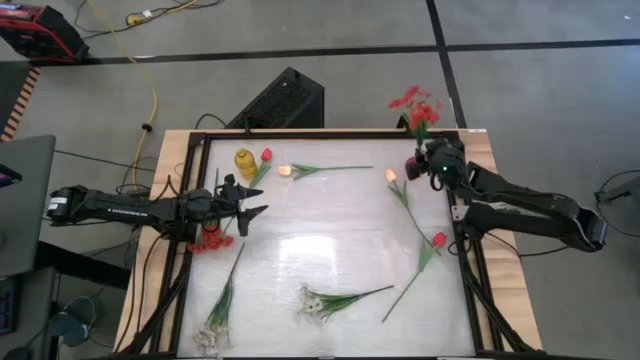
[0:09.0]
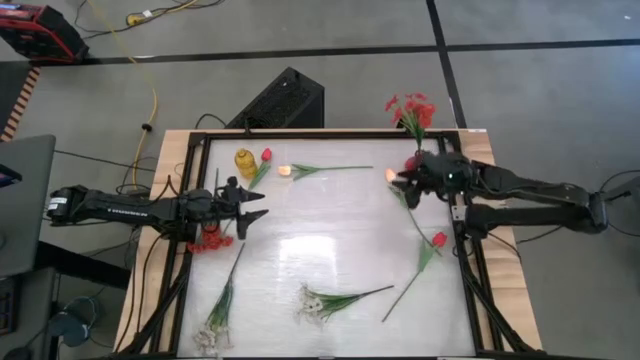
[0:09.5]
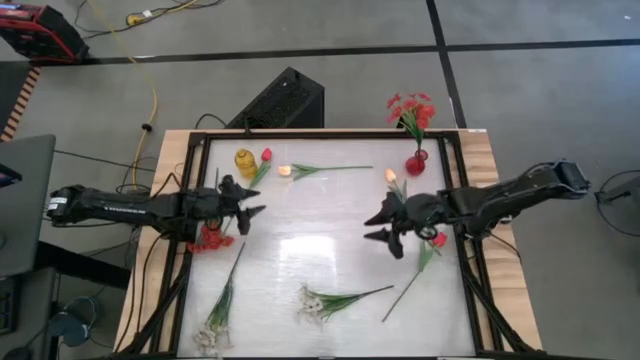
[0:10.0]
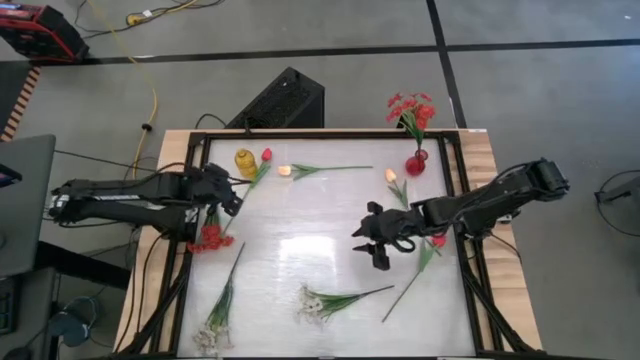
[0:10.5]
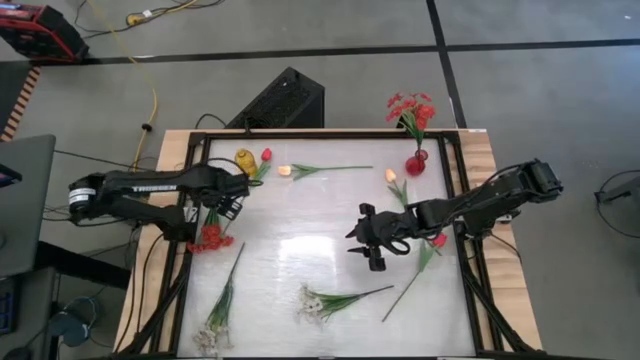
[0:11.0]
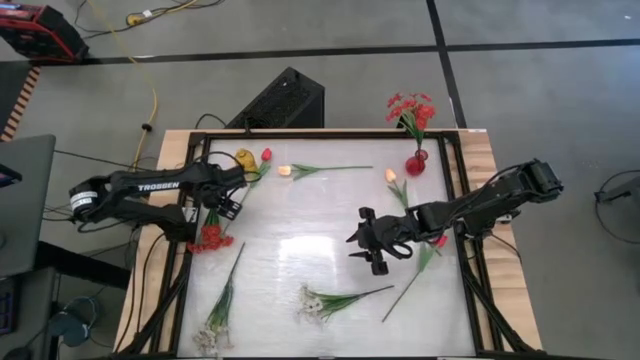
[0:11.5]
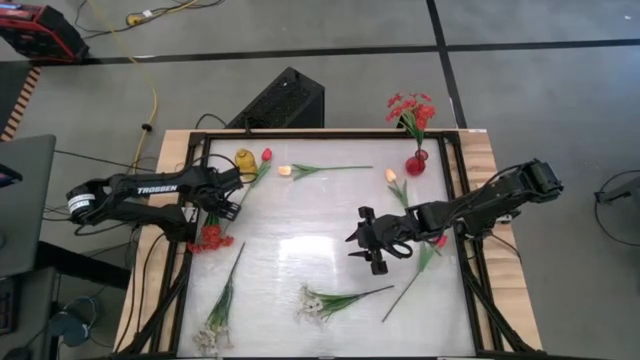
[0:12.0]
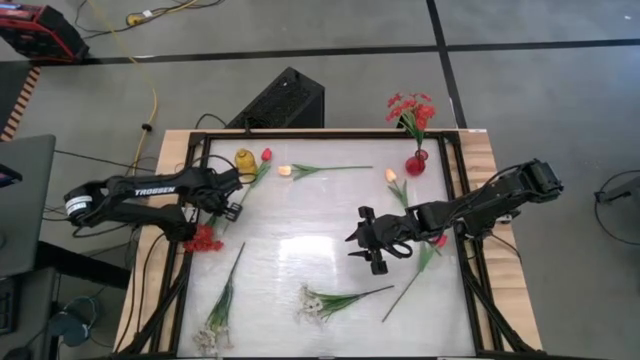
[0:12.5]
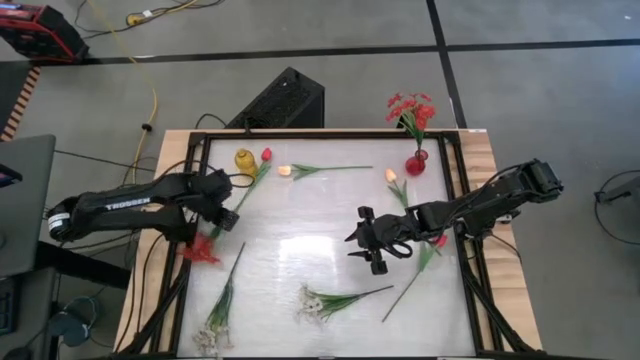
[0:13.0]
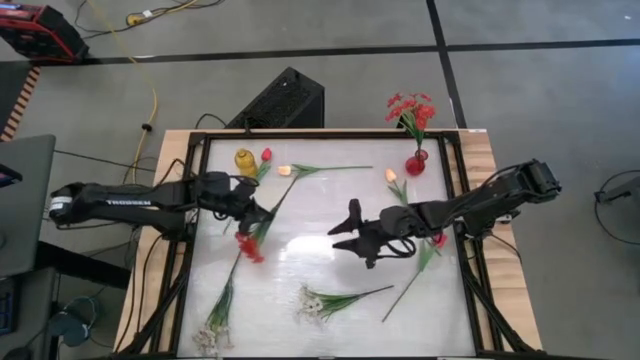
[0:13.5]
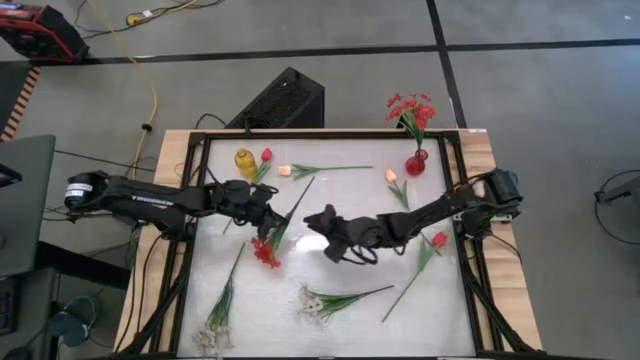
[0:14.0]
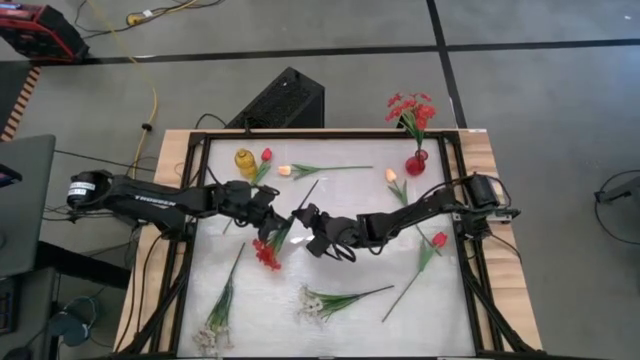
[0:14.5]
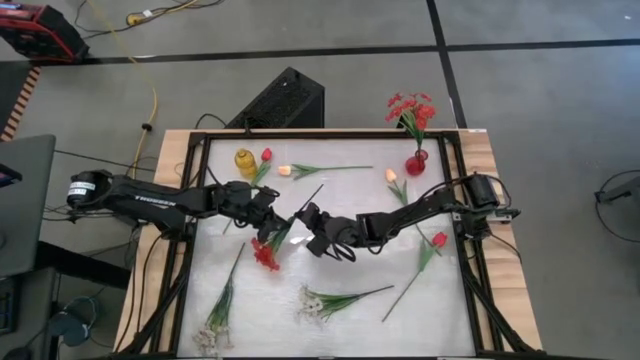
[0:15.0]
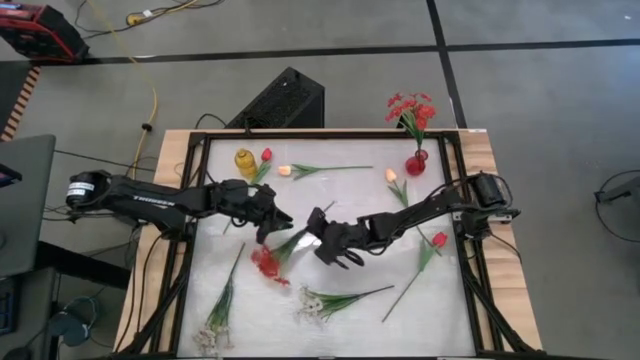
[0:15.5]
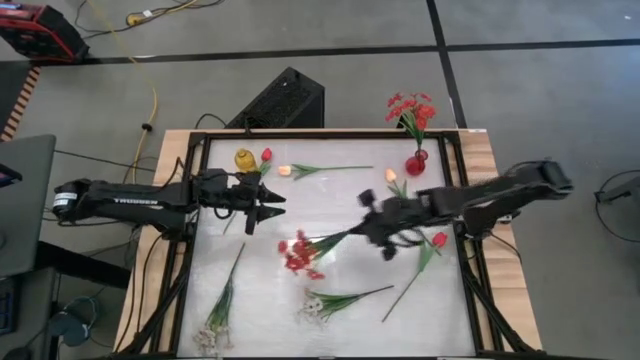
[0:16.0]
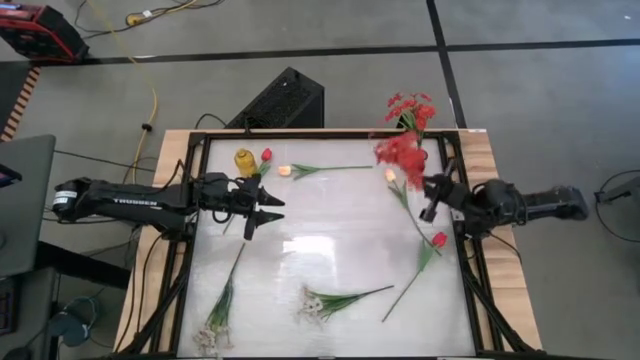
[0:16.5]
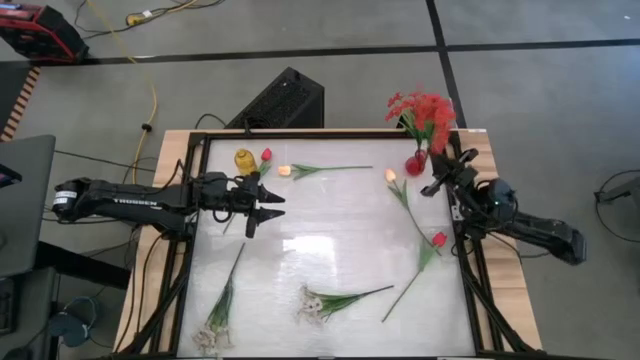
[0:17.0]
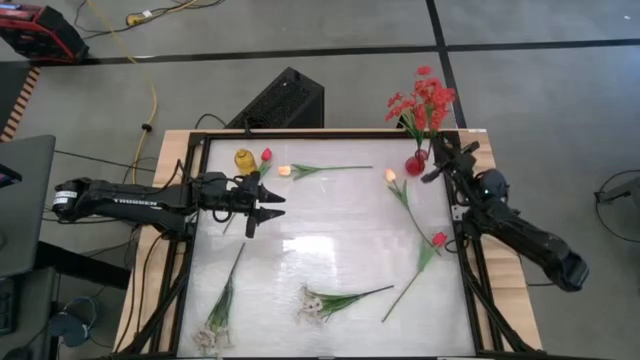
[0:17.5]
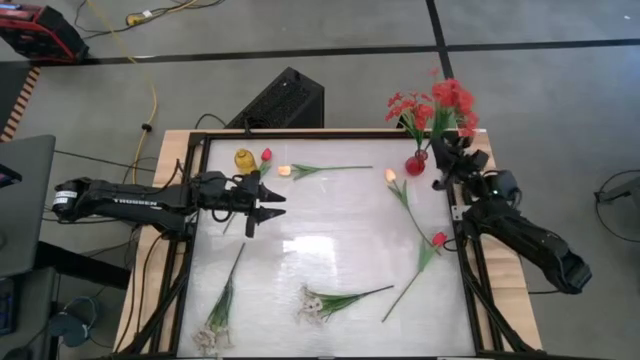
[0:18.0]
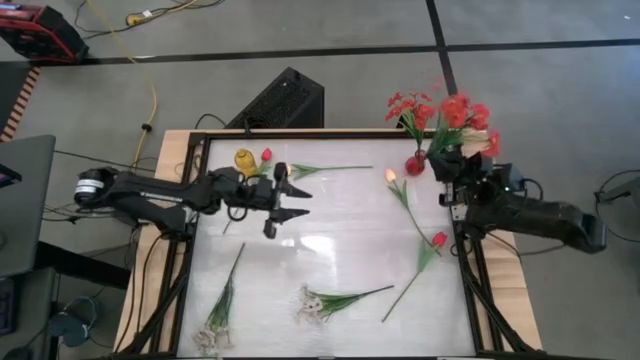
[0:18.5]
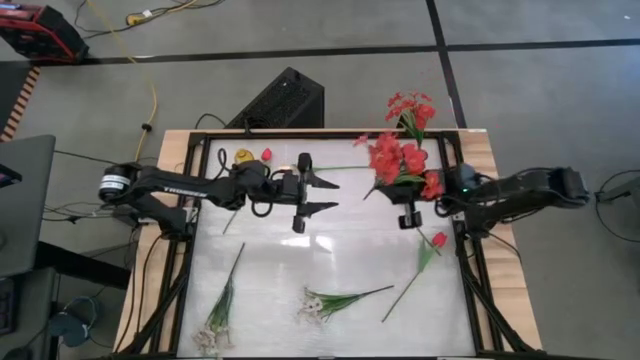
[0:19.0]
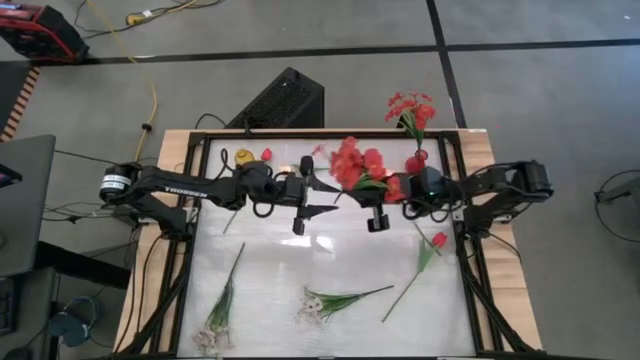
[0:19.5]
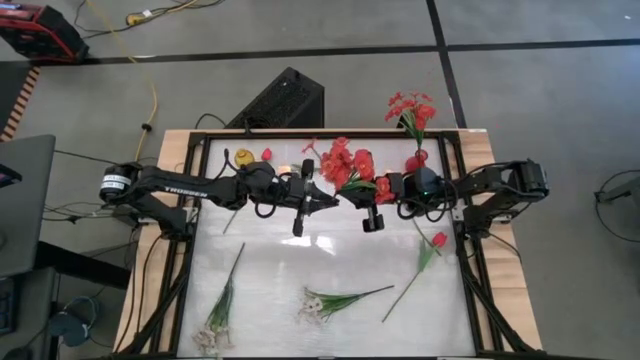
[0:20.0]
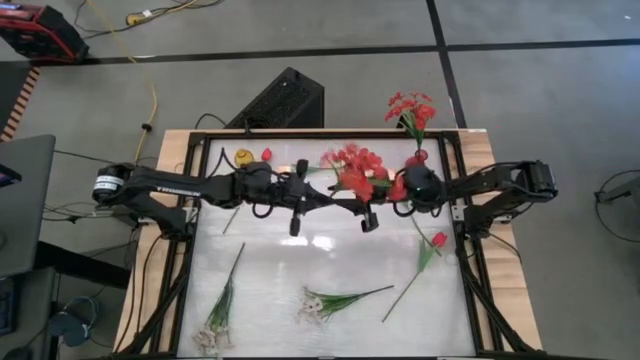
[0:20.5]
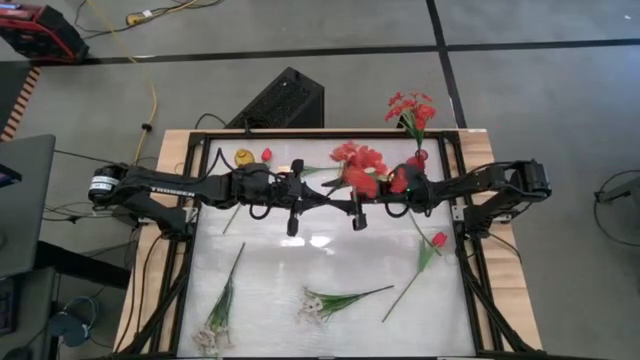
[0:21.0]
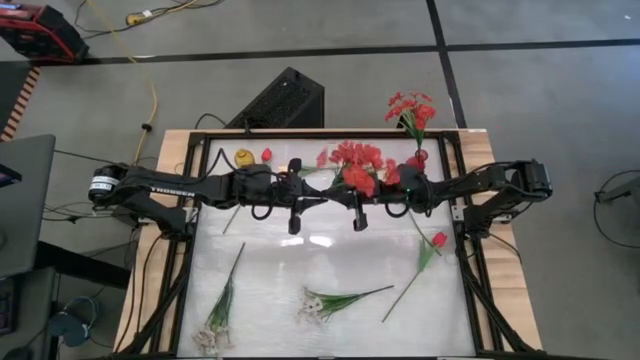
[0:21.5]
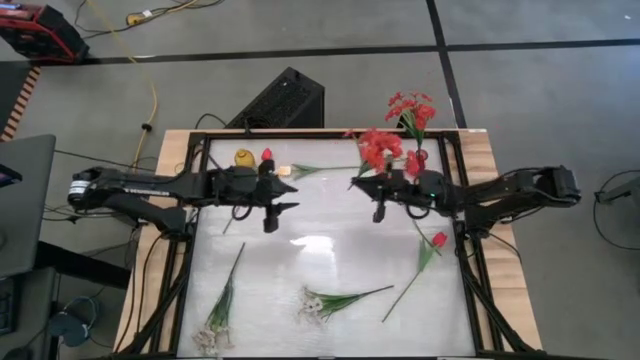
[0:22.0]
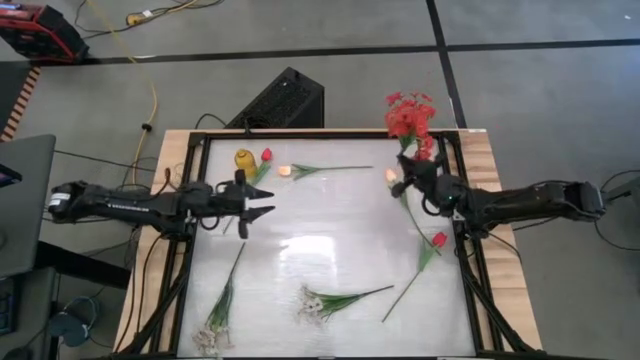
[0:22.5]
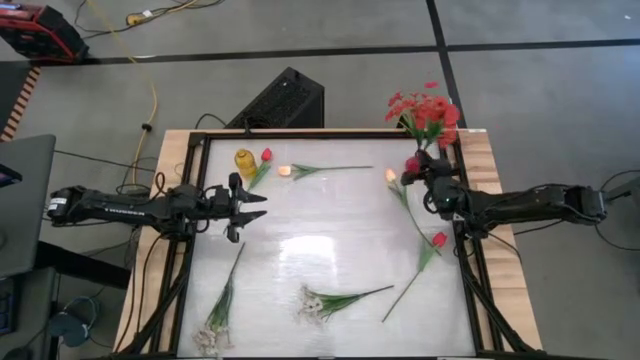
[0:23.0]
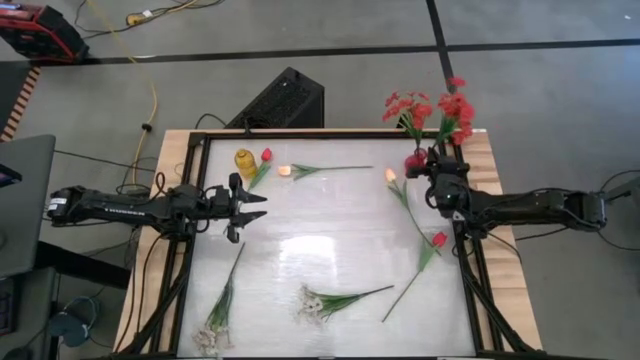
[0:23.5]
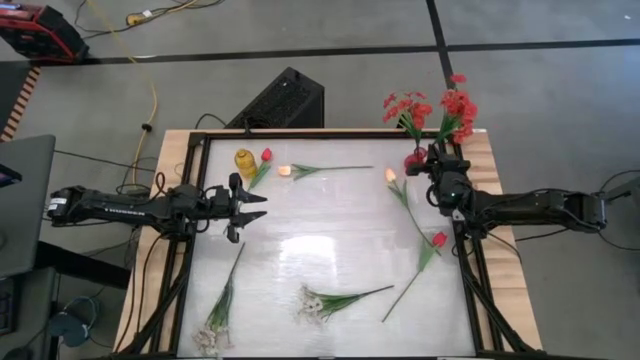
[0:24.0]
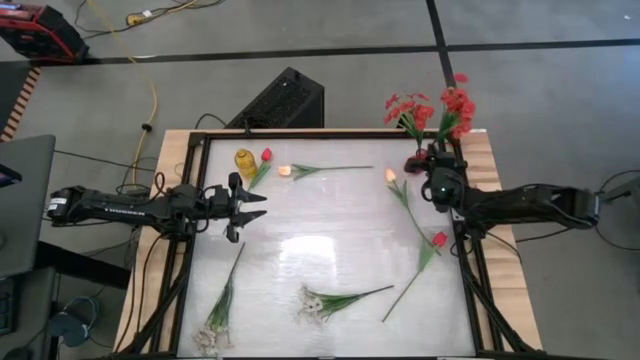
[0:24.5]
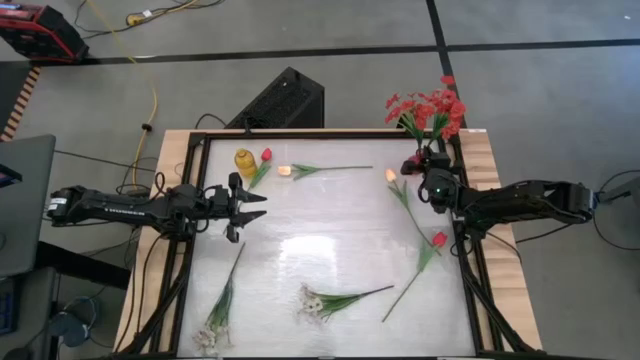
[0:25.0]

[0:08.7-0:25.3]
Task: Sort flowers into vase by color
Put the red flowers into the red vase

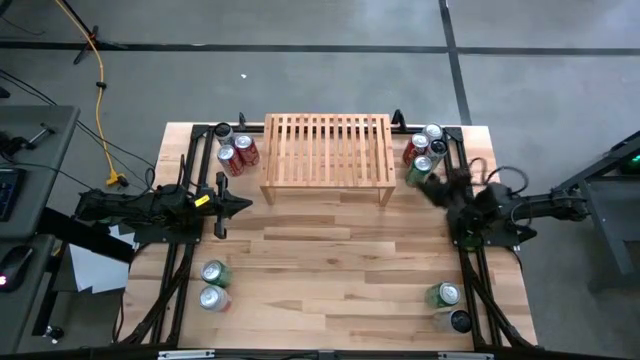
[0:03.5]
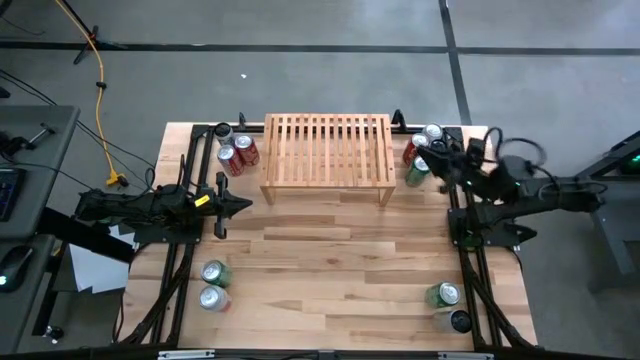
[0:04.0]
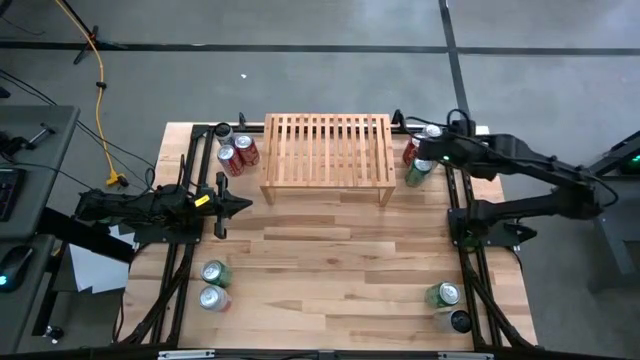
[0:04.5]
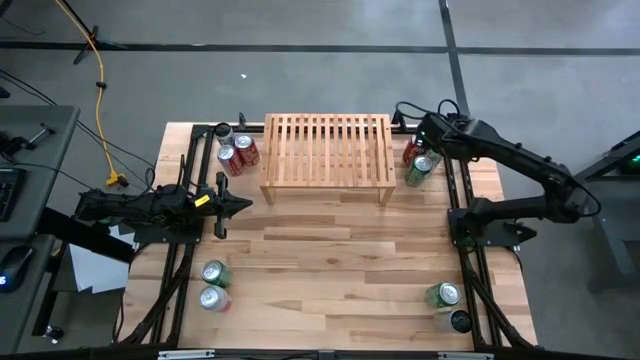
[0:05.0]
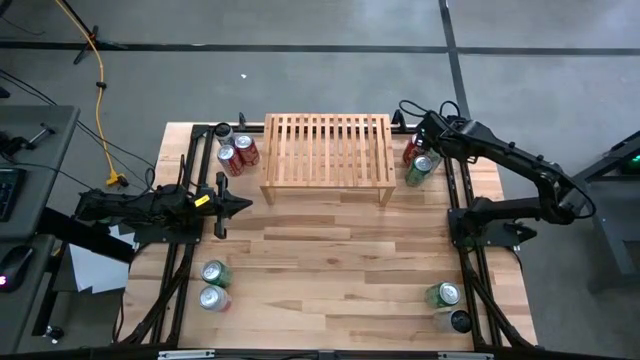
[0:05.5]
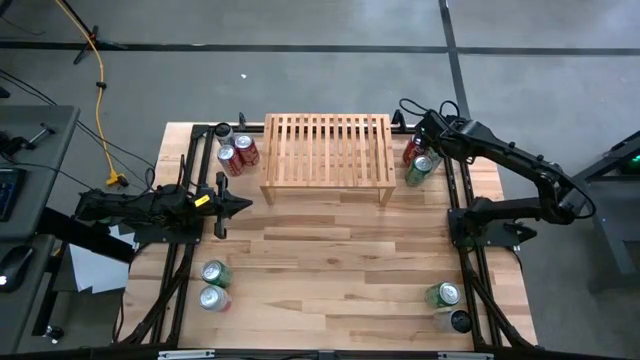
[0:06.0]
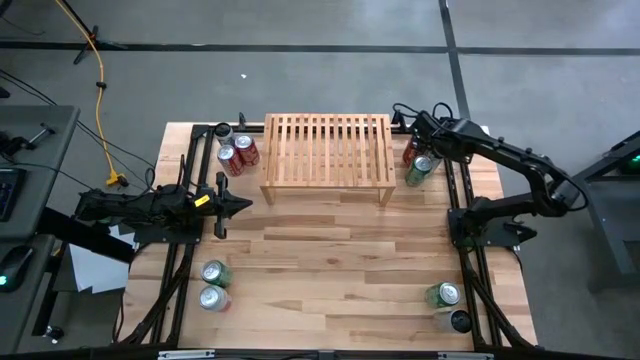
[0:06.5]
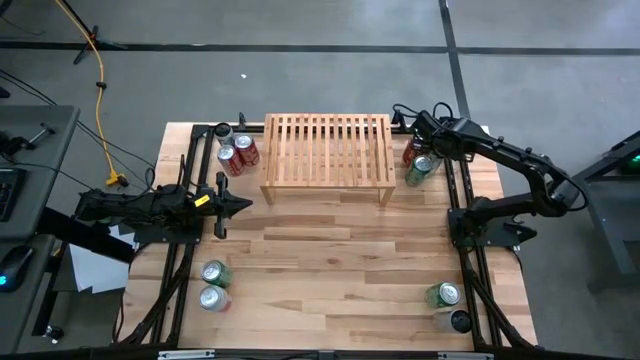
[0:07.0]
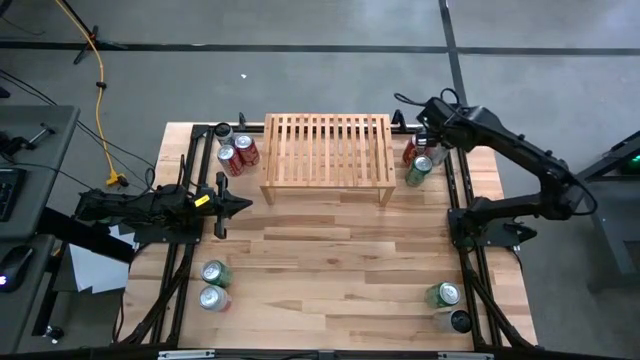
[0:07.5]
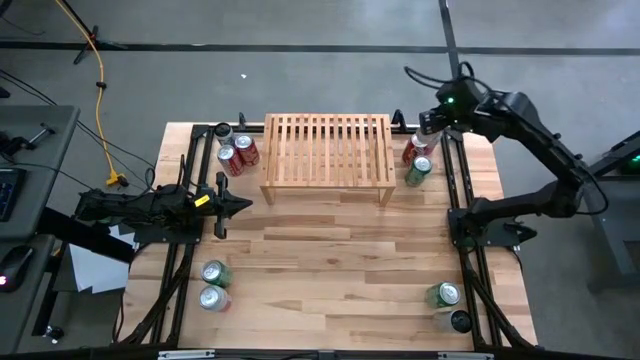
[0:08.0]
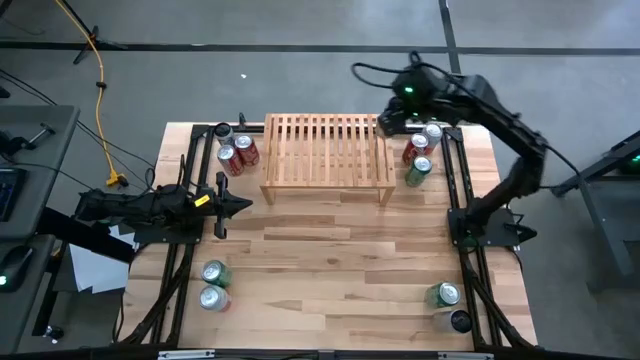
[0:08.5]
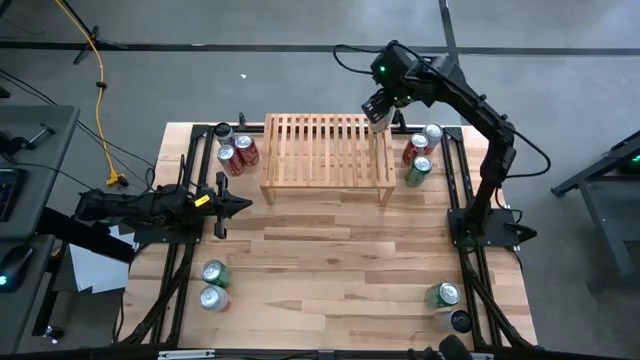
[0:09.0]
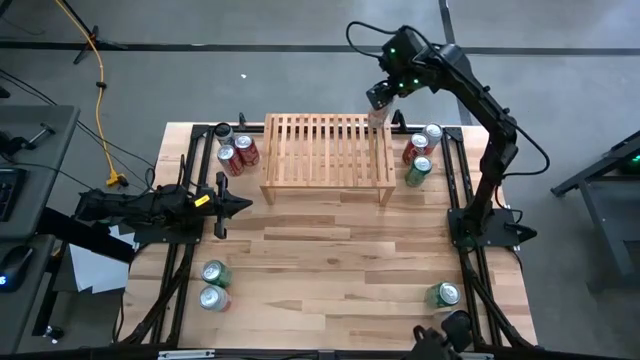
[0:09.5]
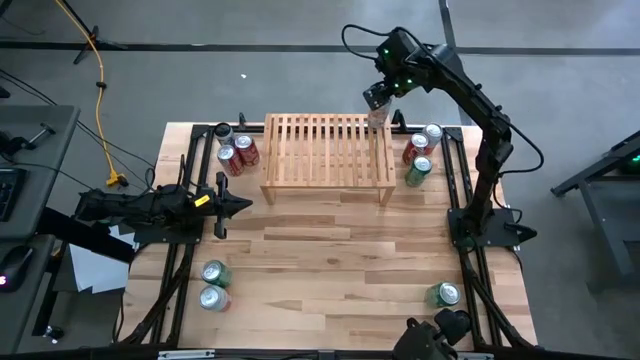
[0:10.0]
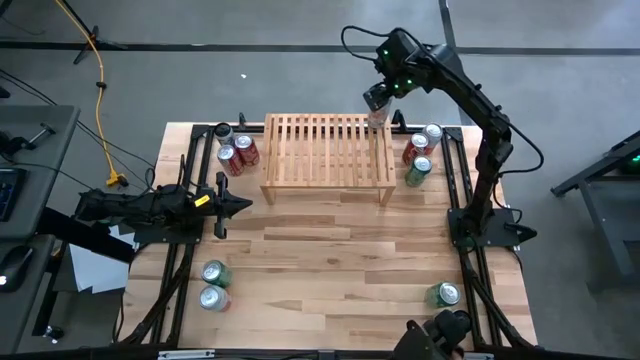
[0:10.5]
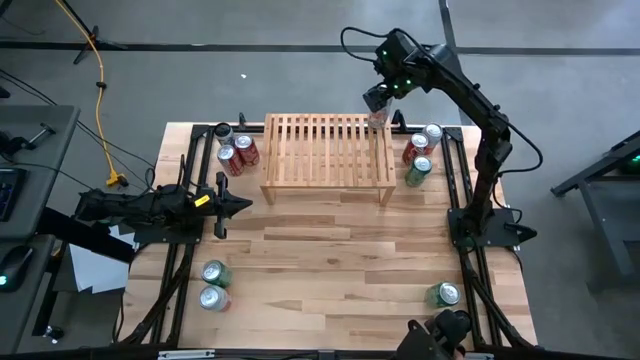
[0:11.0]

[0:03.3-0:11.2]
Task: Place canned beverage on shelf
Put the top right white pink soda can on the shelf
